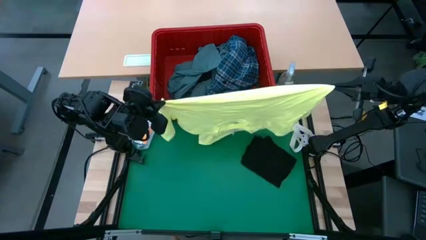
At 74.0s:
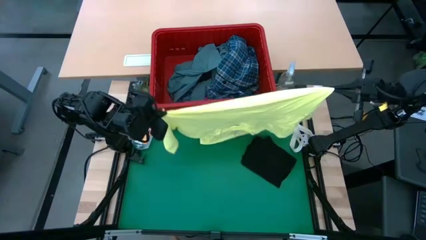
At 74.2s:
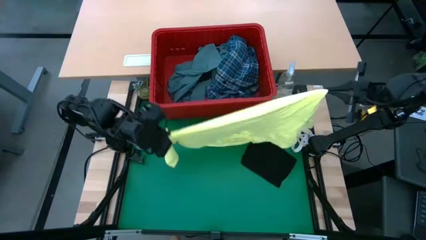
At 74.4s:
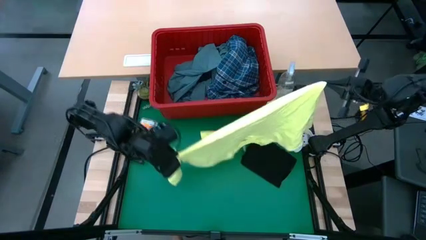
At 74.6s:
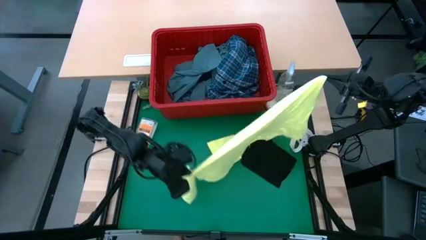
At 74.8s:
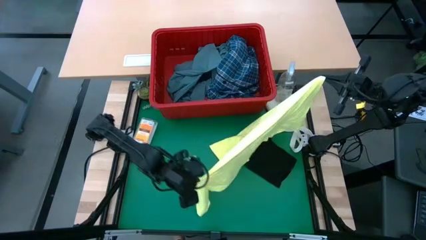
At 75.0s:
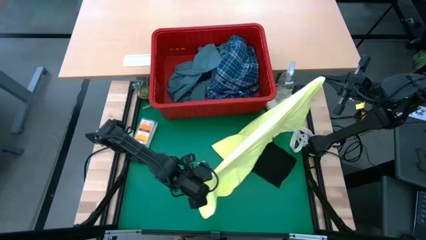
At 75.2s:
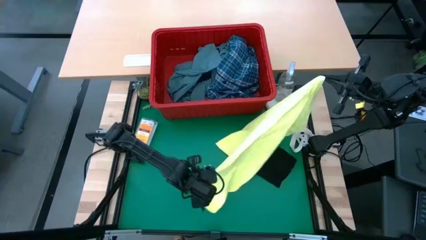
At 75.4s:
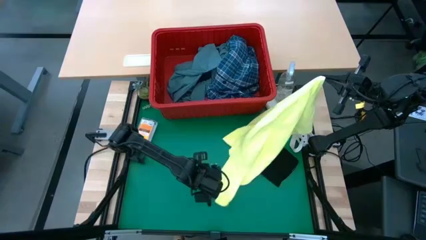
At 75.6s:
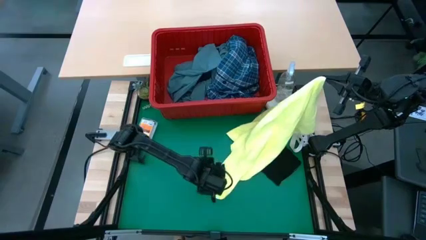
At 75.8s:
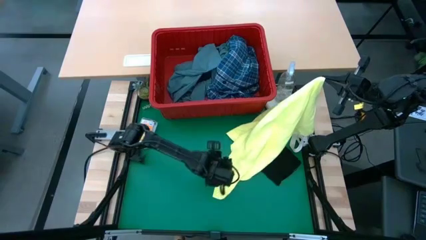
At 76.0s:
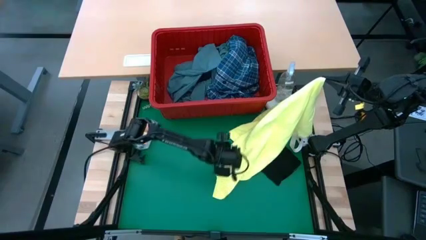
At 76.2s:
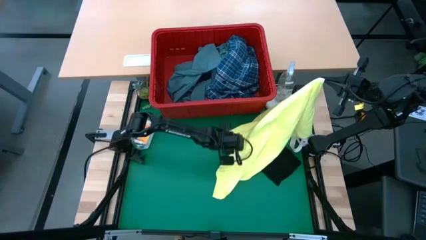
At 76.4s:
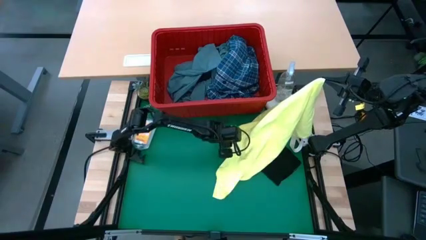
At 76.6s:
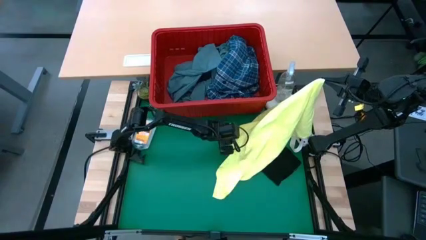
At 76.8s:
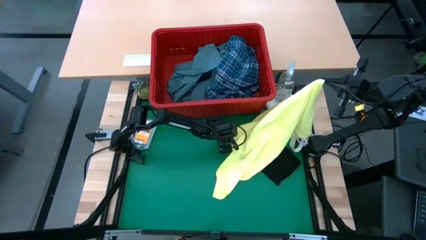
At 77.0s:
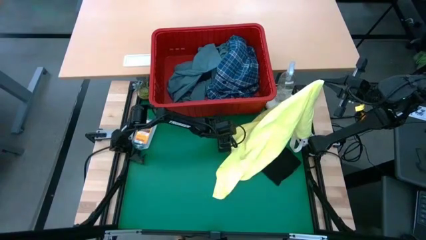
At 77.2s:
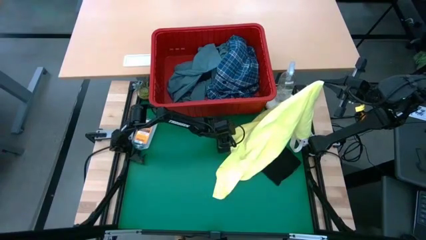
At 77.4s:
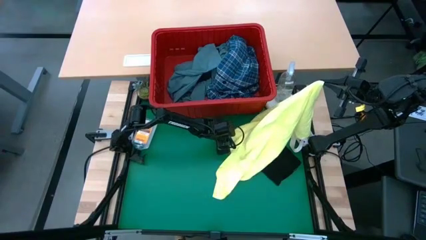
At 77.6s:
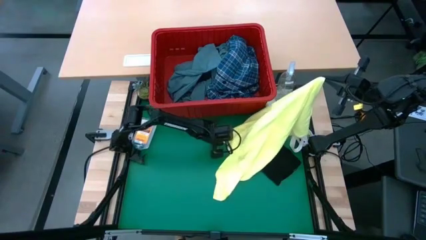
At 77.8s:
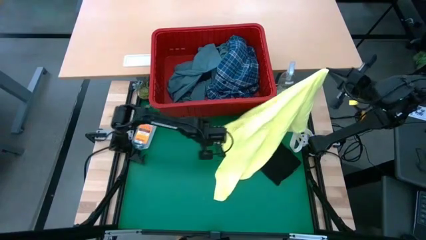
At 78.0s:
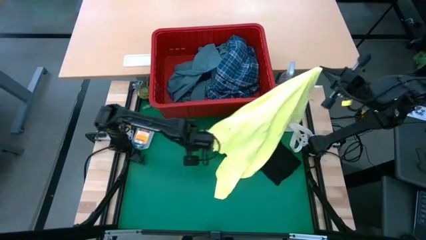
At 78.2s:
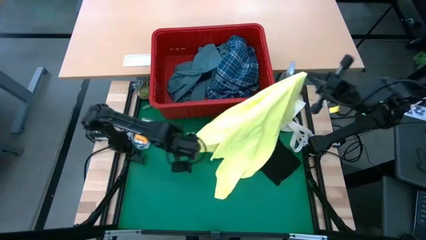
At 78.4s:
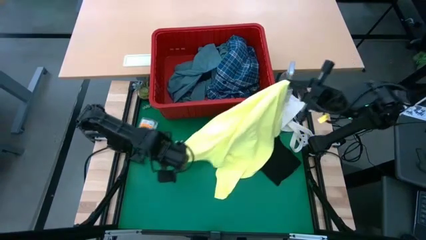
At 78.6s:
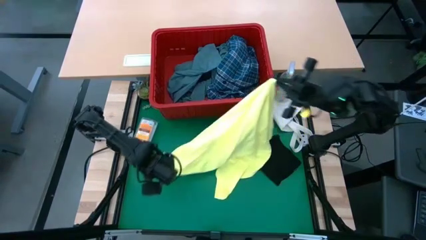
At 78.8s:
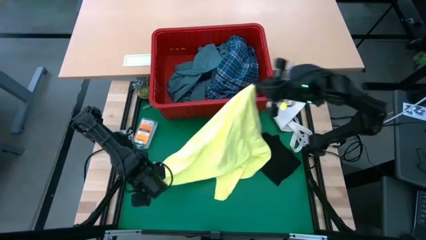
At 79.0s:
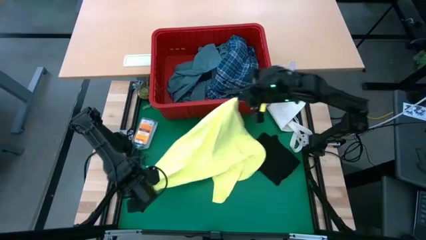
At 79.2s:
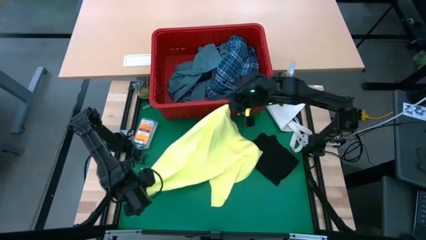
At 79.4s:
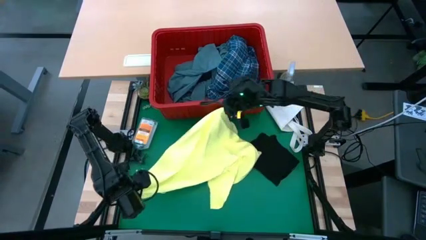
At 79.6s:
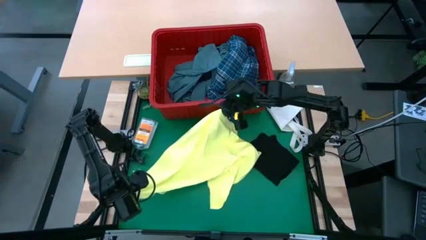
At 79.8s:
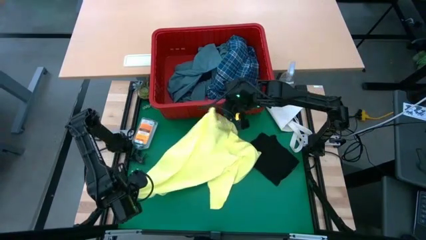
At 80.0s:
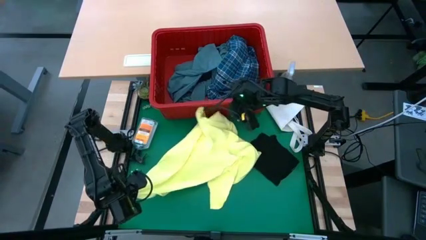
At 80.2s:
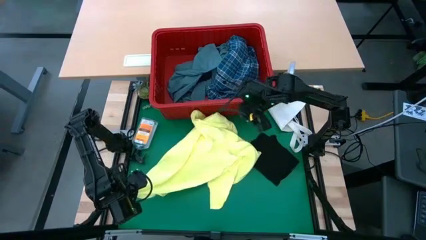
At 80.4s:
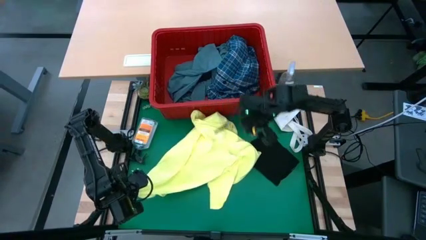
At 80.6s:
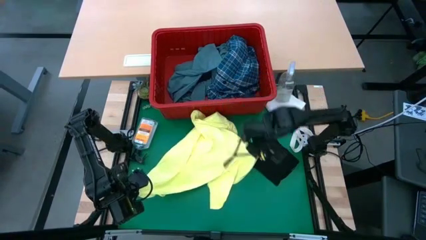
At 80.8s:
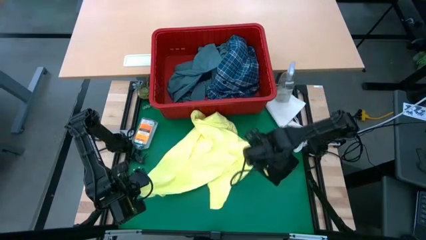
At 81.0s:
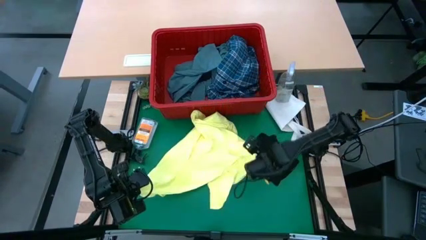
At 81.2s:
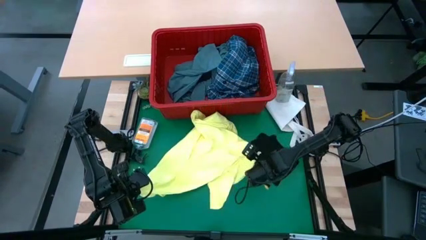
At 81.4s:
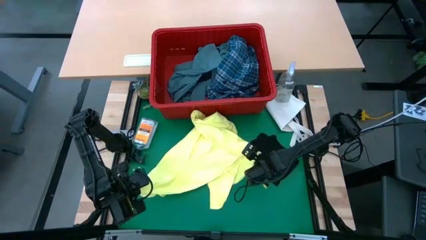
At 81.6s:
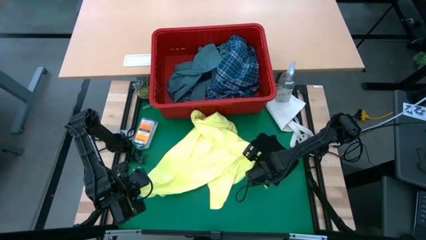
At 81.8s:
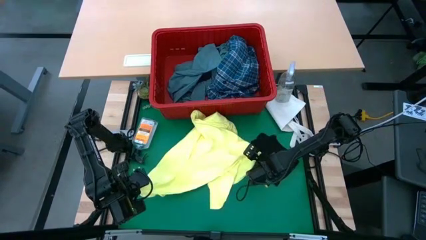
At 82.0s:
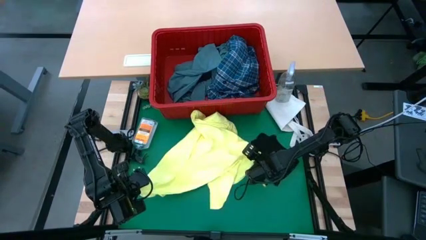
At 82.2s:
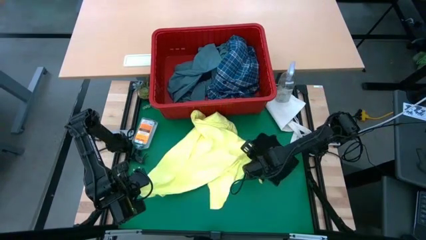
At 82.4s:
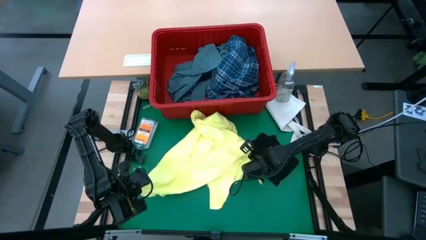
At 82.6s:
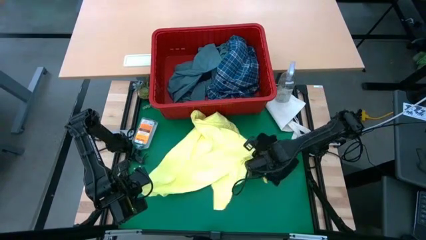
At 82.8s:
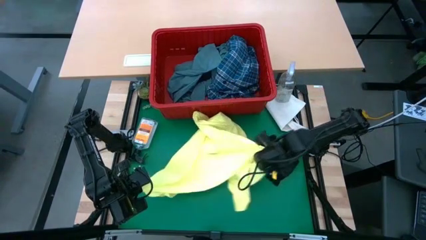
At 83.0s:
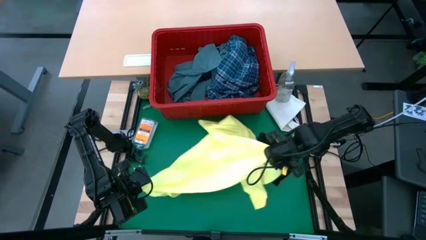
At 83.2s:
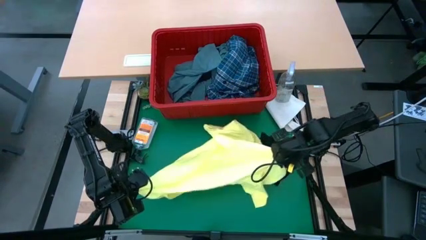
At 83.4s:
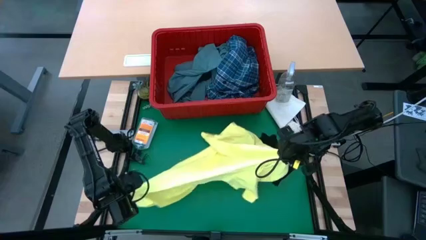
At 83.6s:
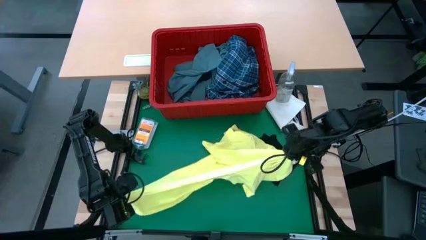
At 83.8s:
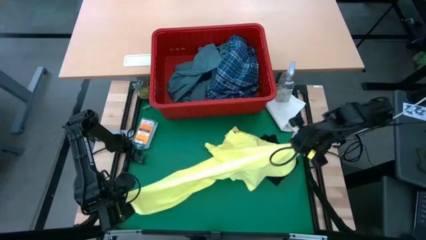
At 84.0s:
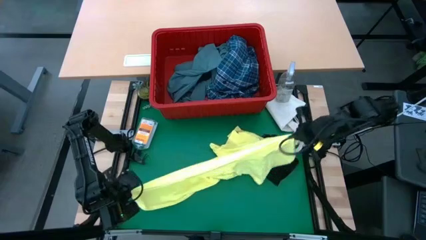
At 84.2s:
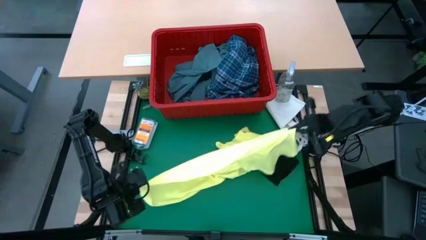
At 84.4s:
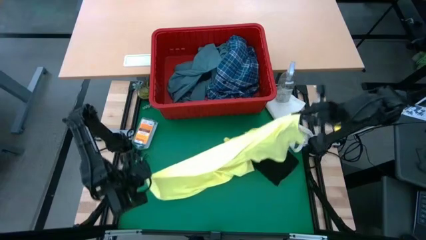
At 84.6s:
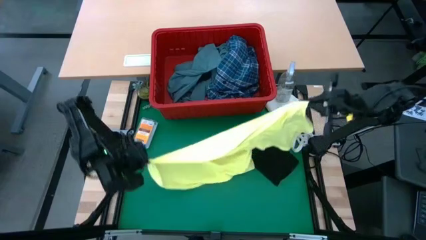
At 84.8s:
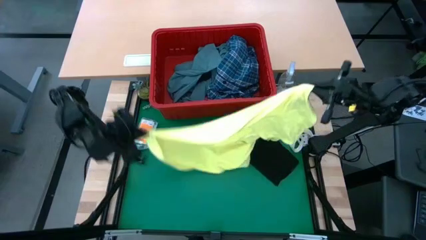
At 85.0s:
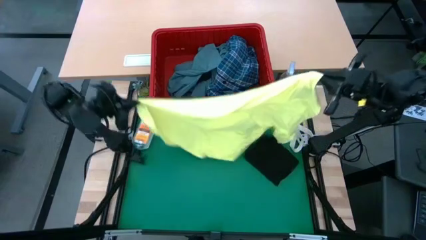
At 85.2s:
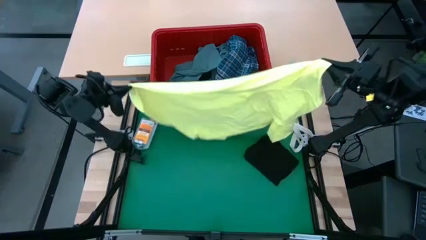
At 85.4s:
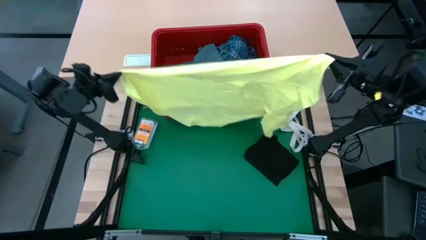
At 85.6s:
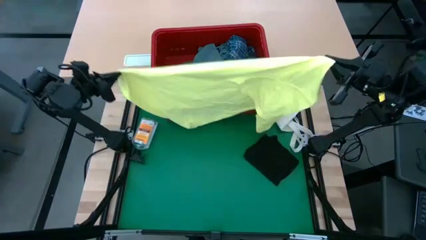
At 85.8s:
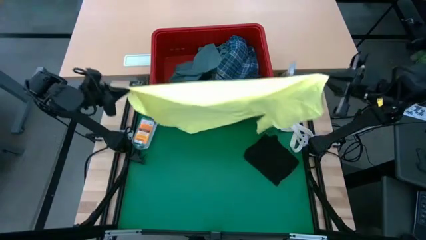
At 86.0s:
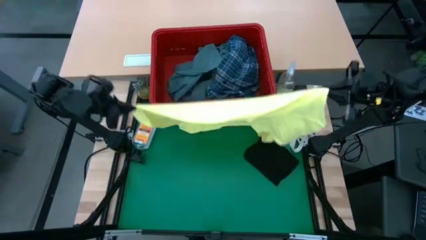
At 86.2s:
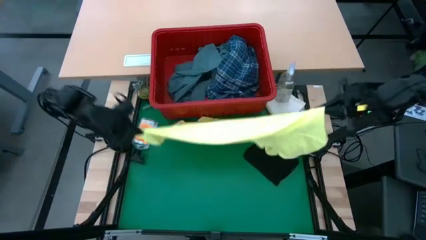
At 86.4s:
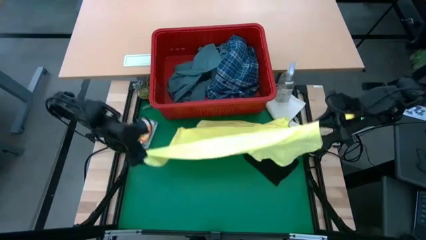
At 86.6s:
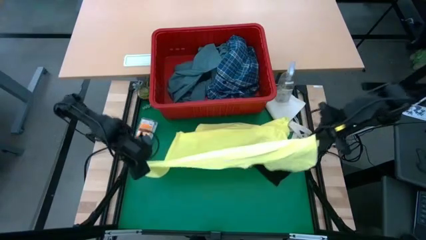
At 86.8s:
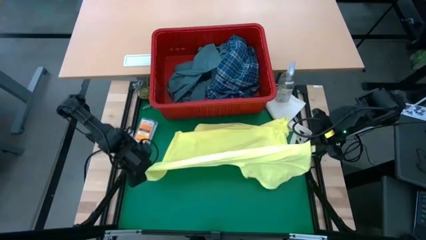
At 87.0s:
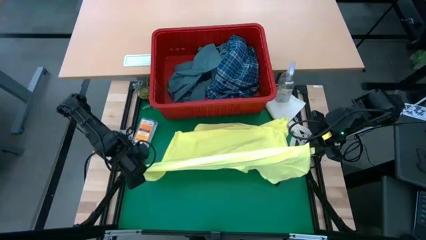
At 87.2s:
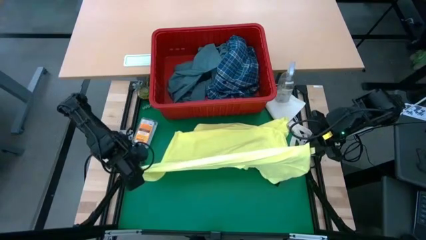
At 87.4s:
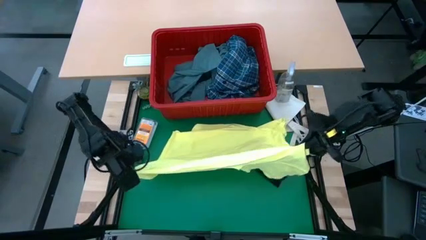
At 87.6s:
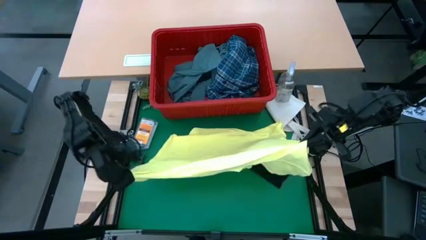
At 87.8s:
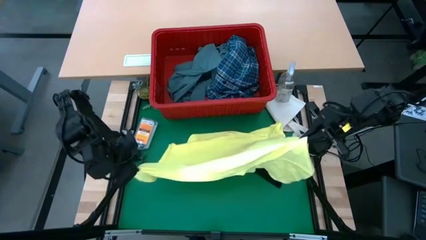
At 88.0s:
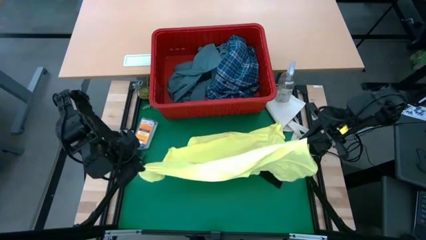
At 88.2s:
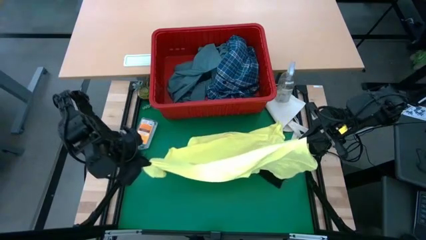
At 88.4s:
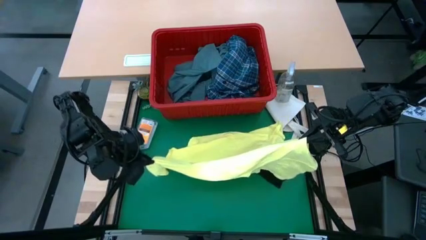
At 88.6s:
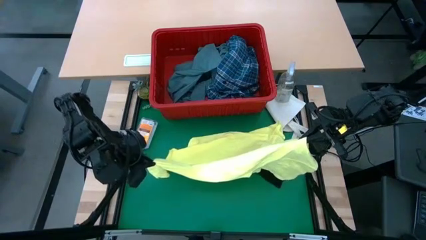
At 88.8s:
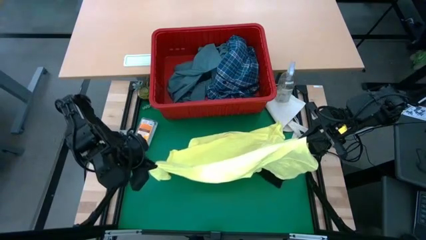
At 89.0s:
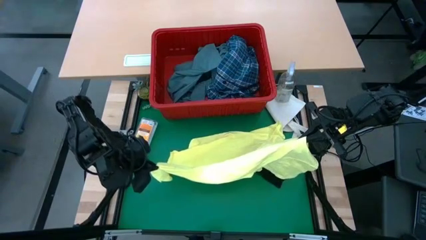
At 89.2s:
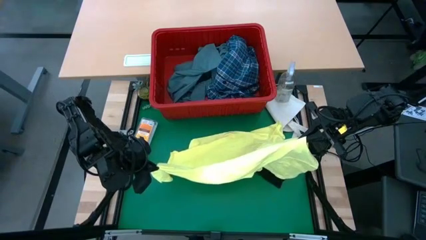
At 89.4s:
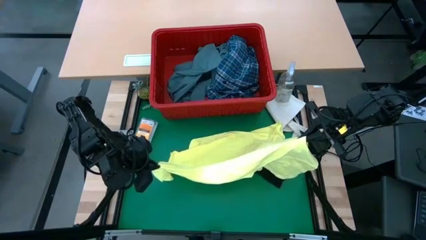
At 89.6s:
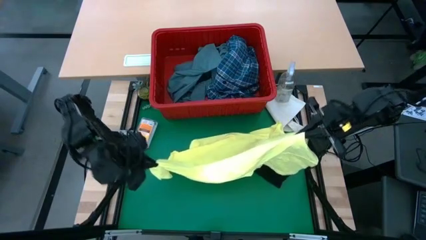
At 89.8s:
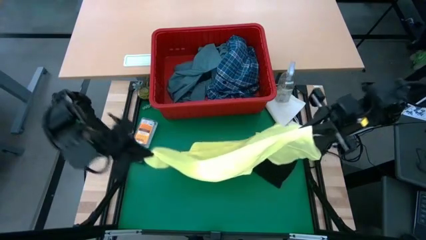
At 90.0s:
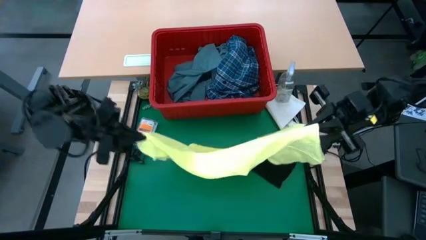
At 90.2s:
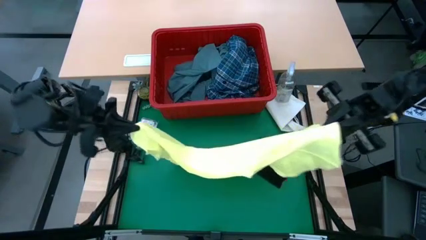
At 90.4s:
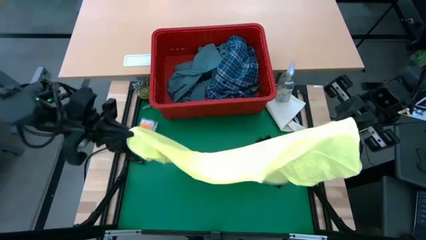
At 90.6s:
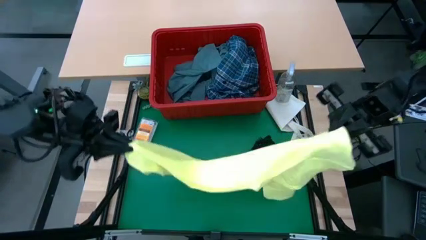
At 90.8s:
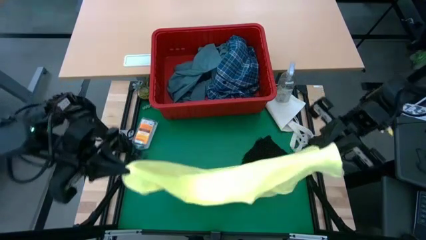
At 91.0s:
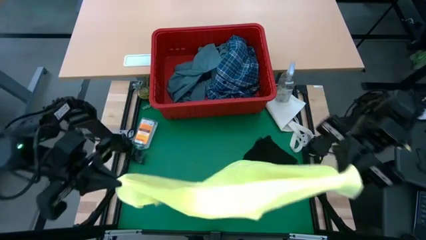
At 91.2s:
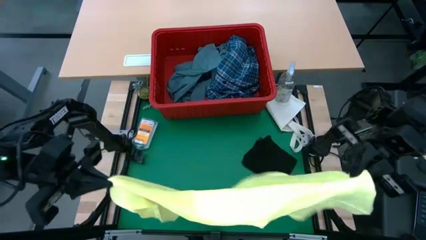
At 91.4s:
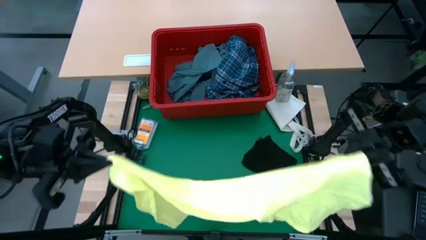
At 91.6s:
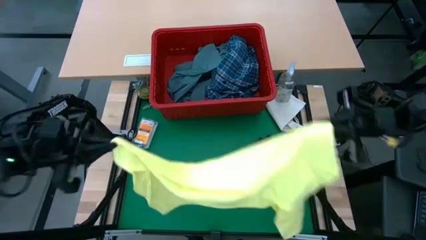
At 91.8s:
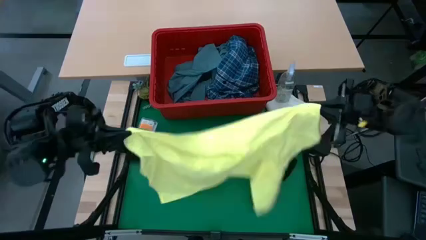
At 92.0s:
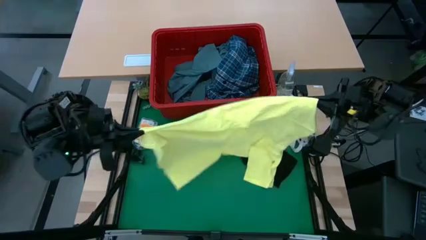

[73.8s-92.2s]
Task: Fold Laundry from Bin
Fold the yellow shirt
